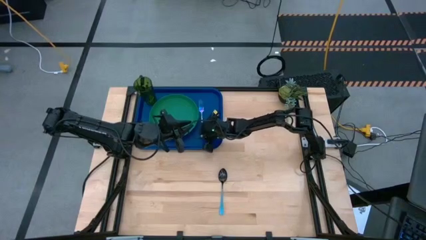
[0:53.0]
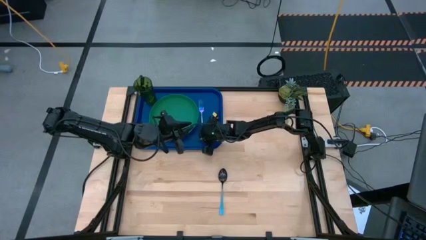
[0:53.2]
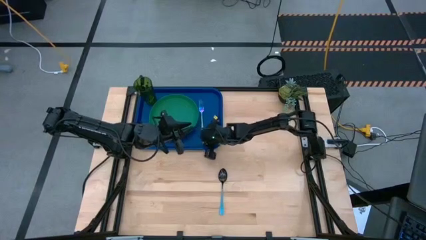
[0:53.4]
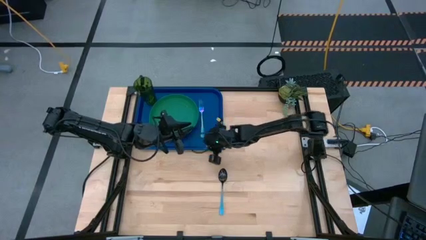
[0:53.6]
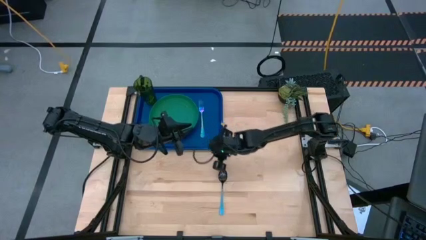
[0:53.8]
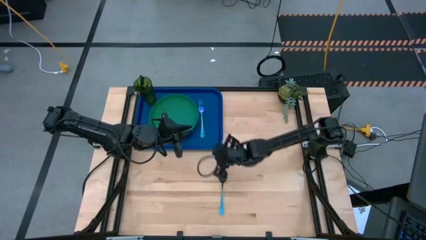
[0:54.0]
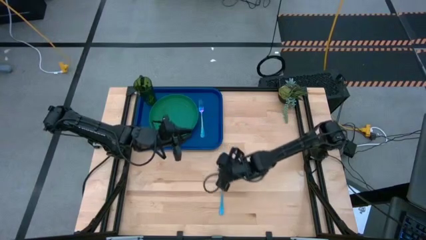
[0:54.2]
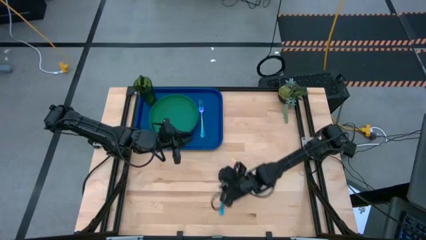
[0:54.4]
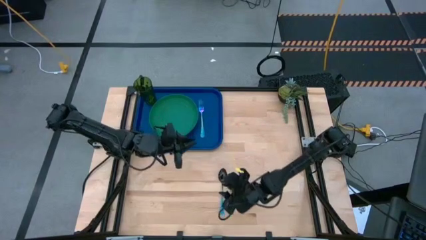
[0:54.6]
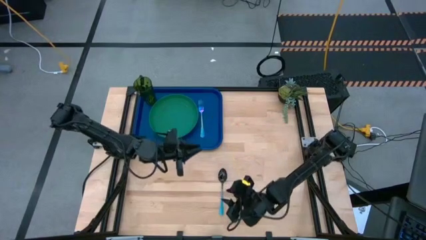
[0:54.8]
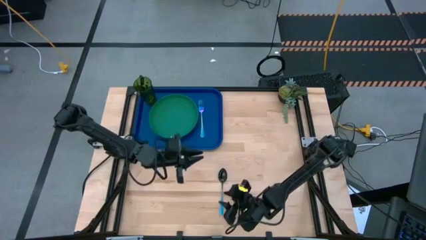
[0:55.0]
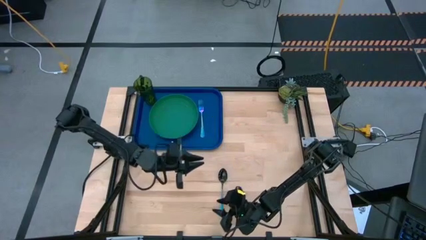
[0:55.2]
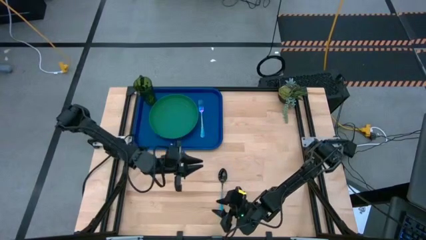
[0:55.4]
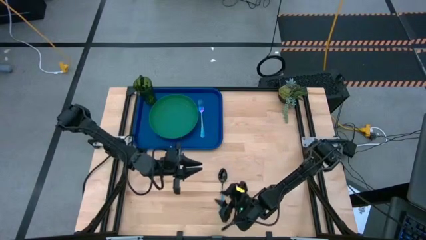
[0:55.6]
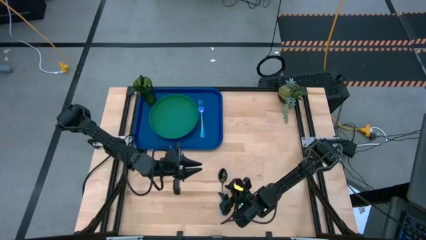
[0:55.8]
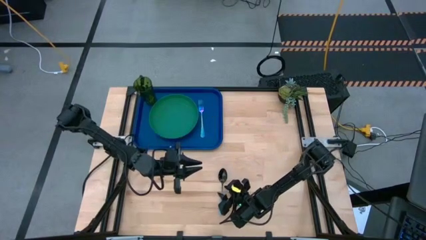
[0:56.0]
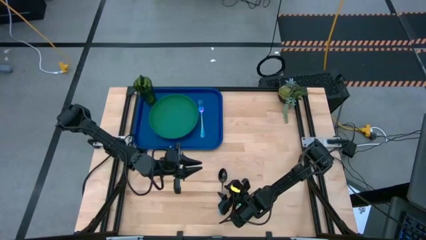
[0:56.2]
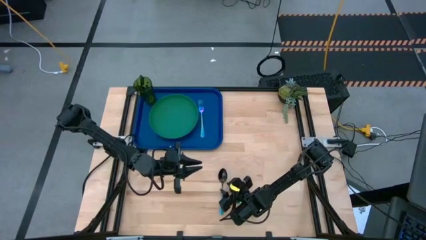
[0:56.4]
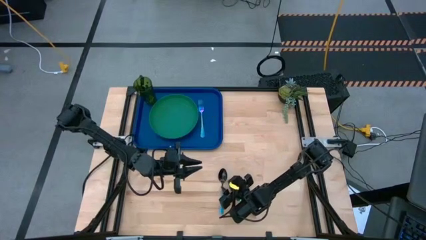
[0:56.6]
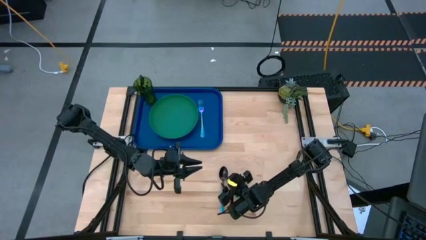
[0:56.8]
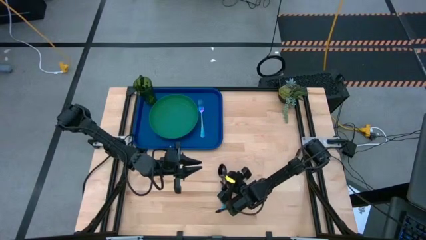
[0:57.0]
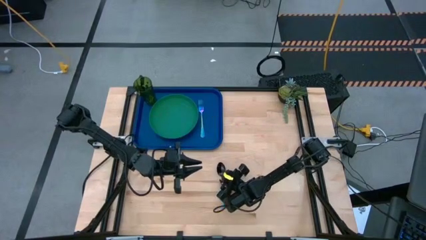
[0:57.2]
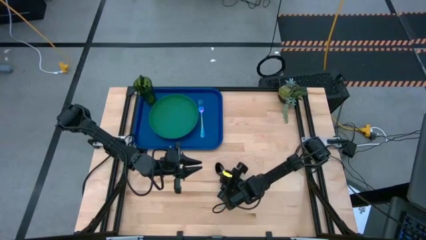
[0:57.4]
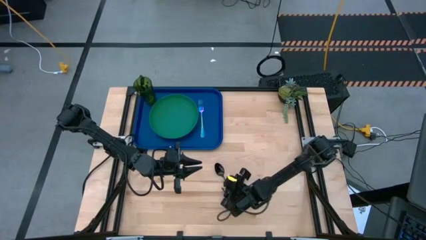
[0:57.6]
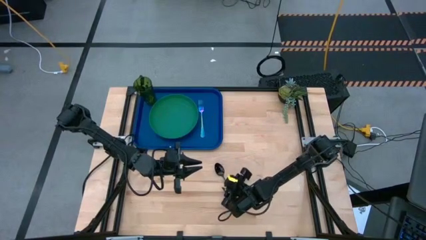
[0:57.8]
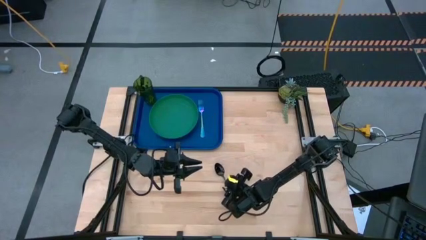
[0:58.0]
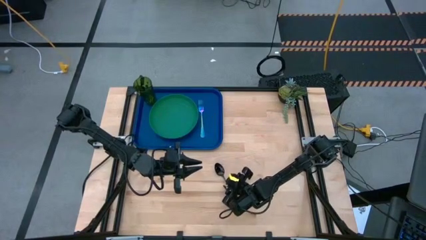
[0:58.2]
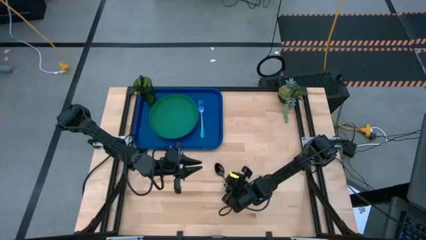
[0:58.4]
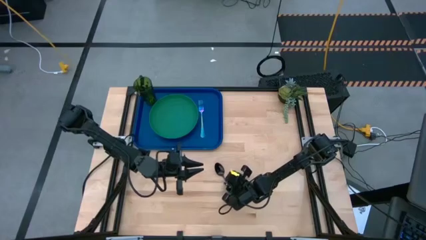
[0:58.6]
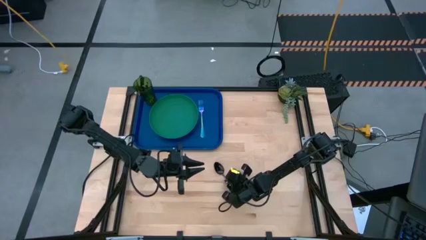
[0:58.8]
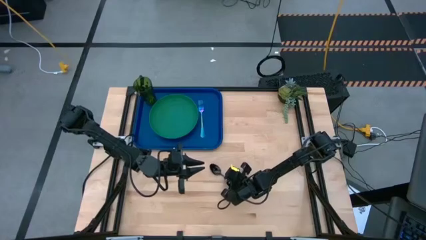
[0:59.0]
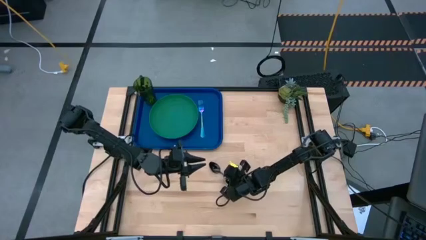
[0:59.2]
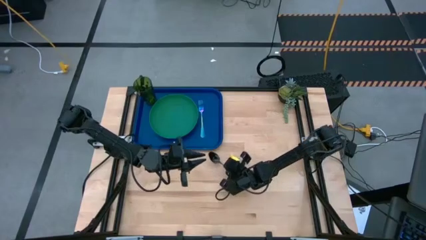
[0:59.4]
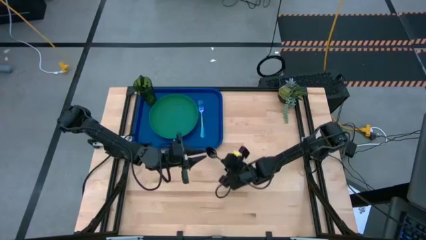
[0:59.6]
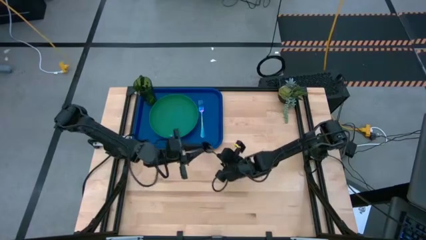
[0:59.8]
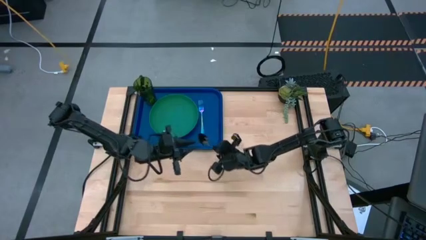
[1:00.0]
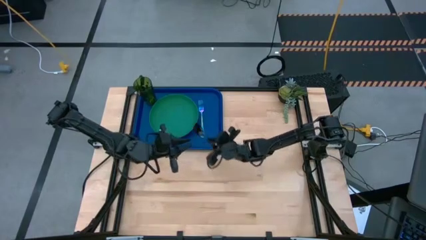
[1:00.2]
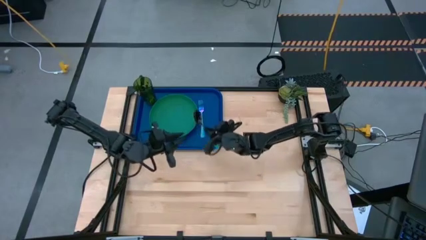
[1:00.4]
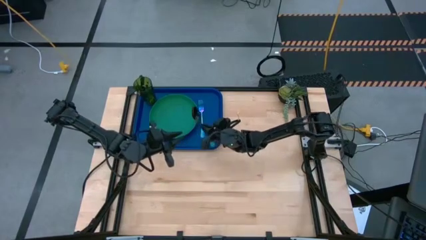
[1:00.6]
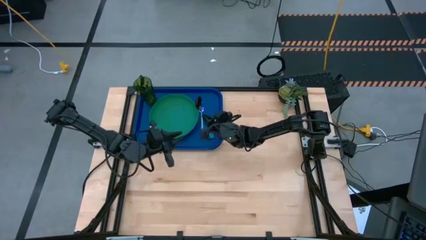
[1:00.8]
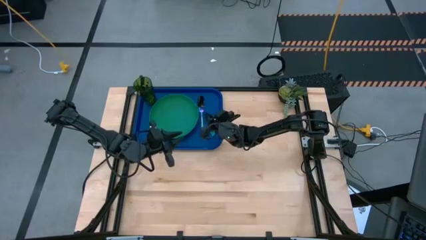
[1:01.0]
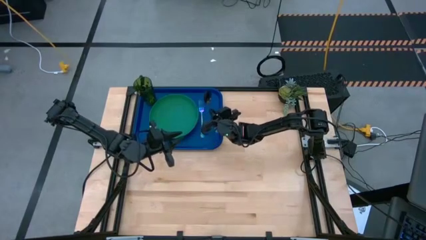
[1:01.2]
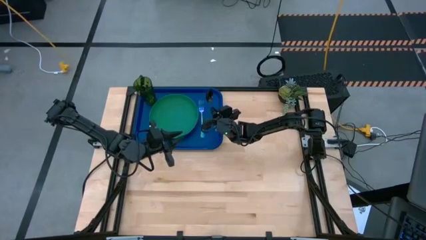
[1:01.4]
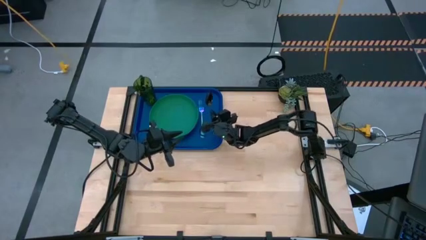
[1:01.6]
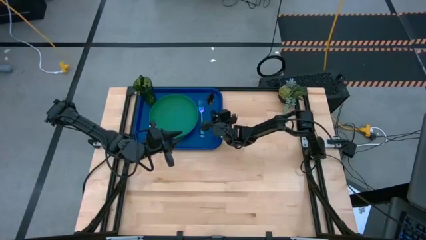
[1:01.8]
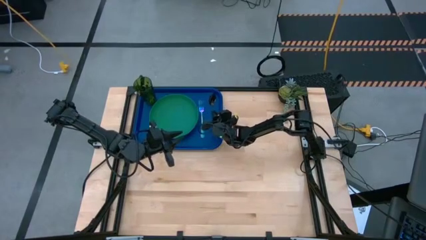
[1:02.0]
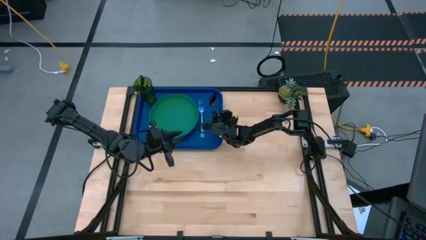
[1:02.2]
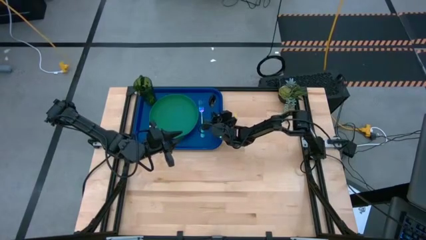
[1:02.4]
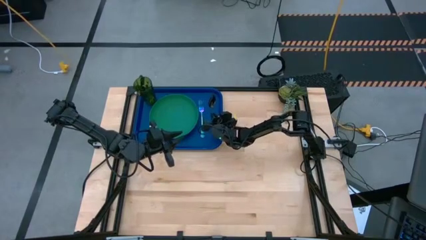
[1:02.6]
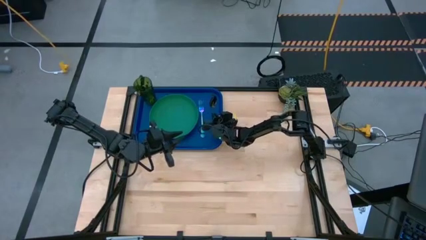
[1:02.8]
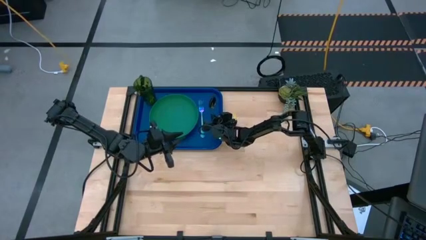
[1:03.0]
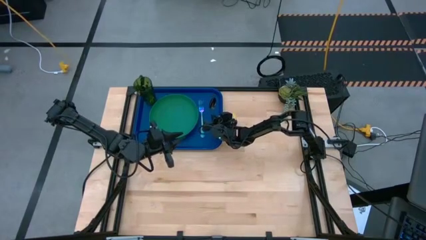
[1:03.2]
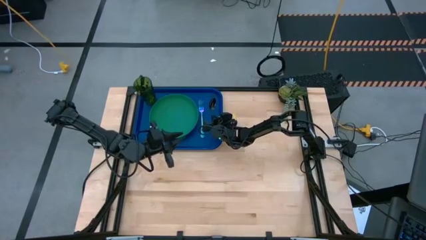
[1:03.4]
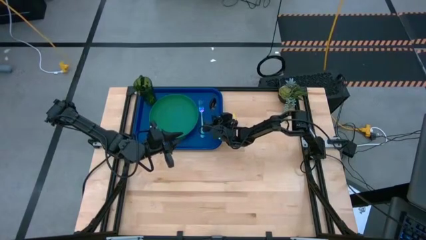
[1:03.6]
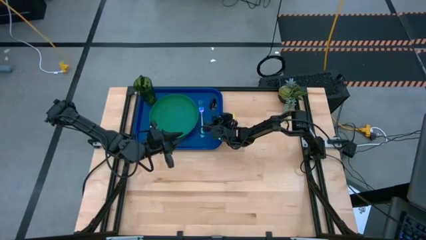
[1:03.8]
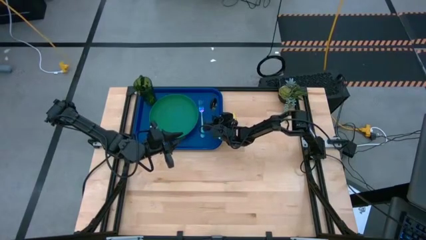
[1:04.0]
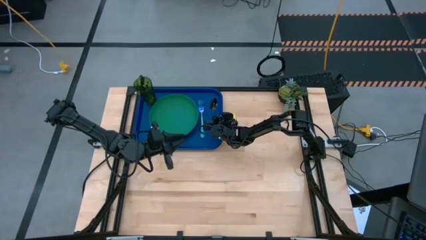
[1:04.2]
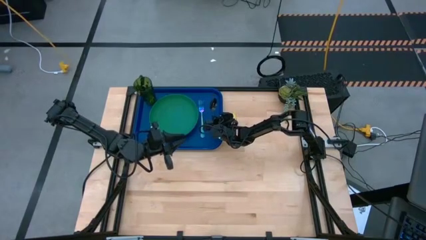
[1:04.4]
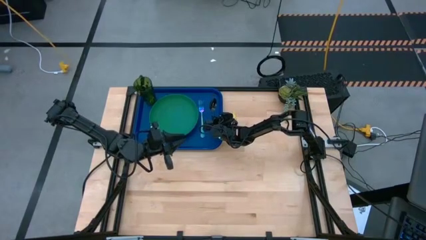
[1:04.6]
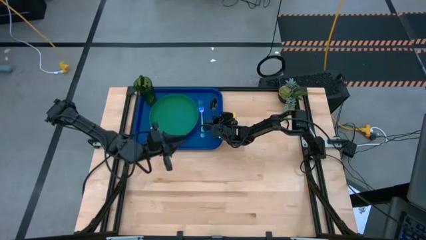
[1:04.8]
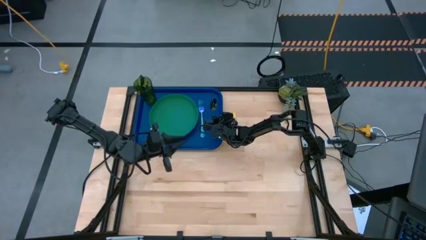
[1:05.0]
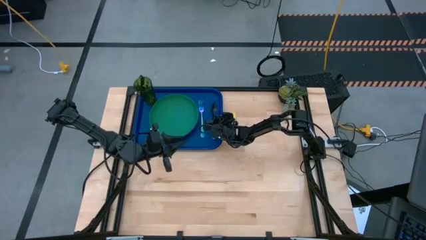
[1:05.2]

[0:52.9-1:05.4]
Task: Pick and place plate/cup/fork/spoon on tray
Put the blue spoon on the blue food tray
